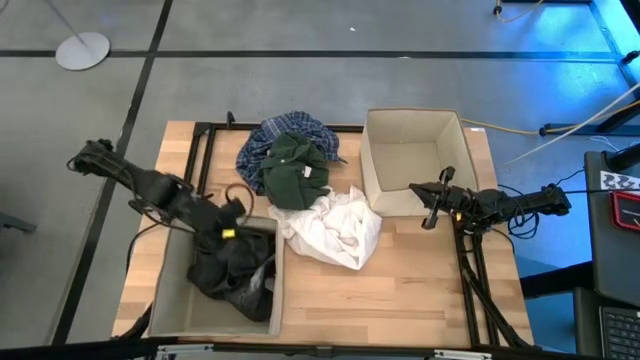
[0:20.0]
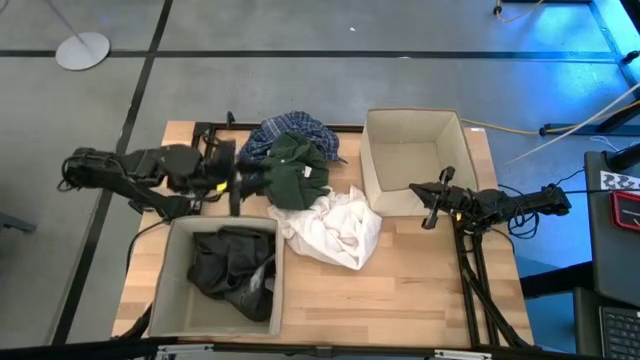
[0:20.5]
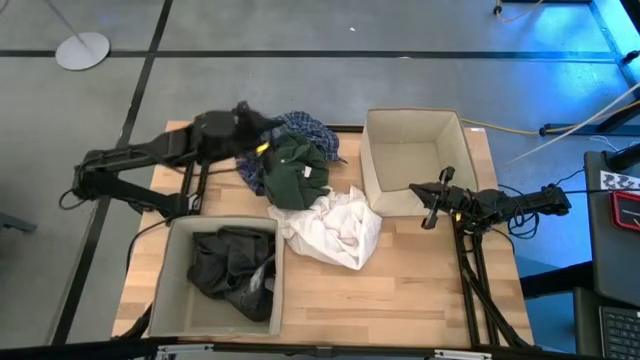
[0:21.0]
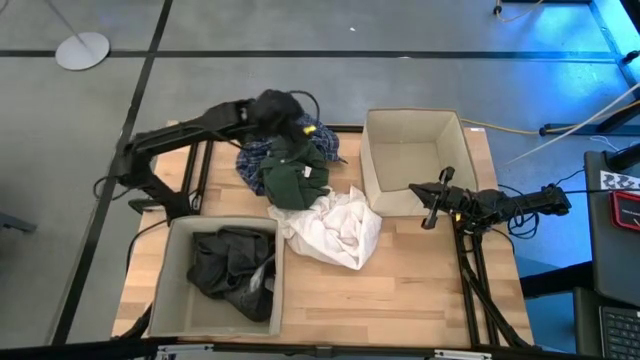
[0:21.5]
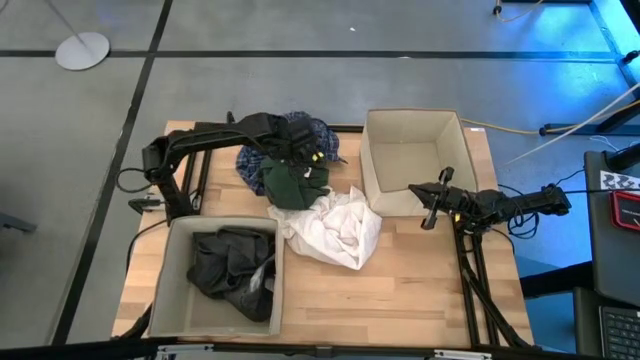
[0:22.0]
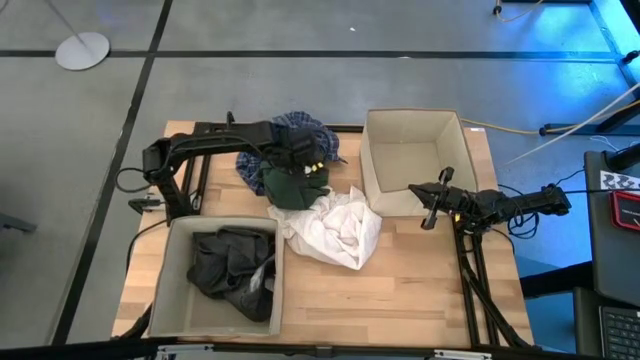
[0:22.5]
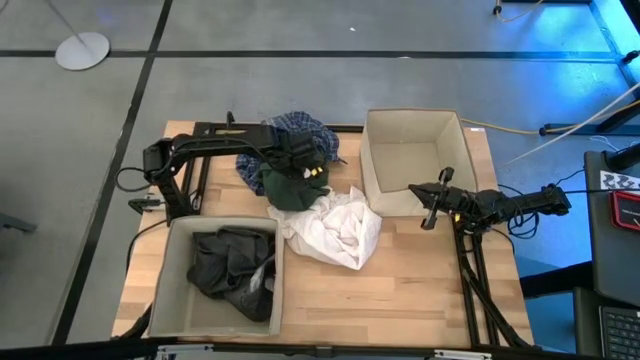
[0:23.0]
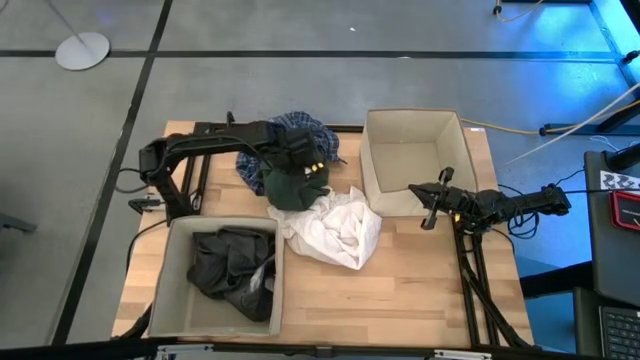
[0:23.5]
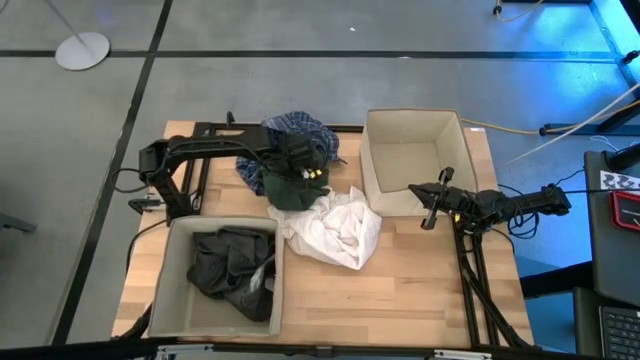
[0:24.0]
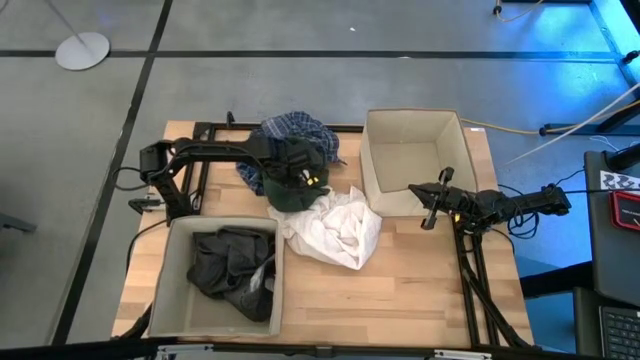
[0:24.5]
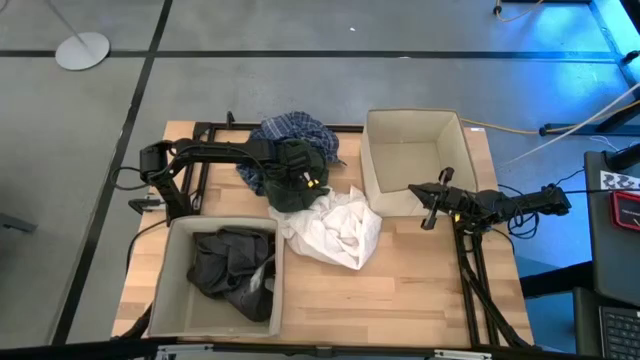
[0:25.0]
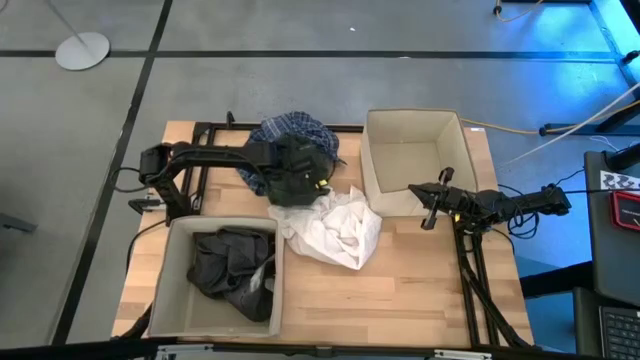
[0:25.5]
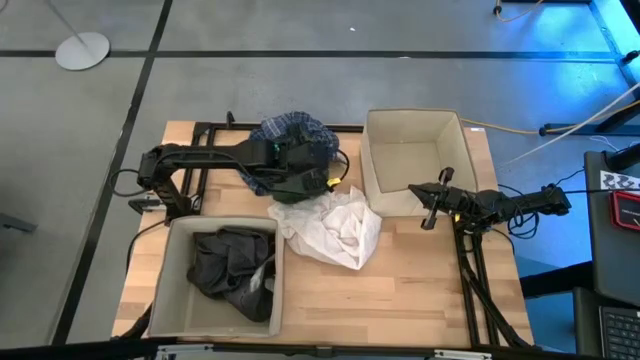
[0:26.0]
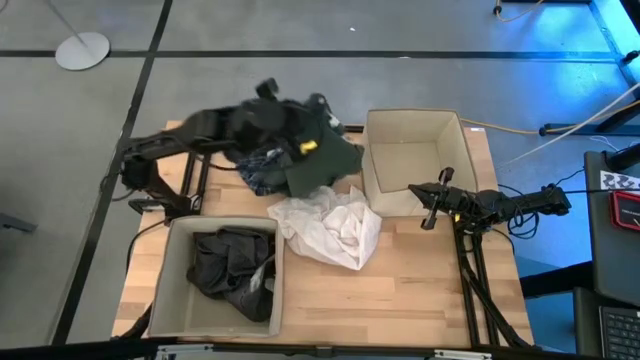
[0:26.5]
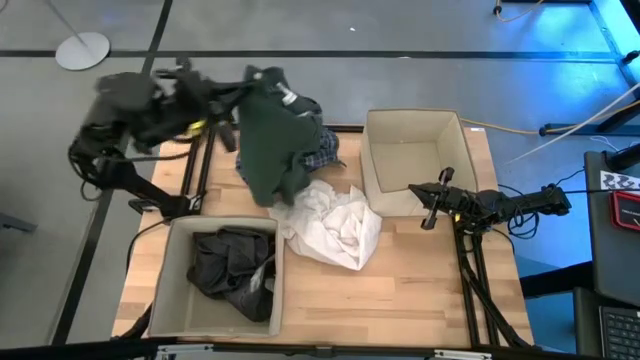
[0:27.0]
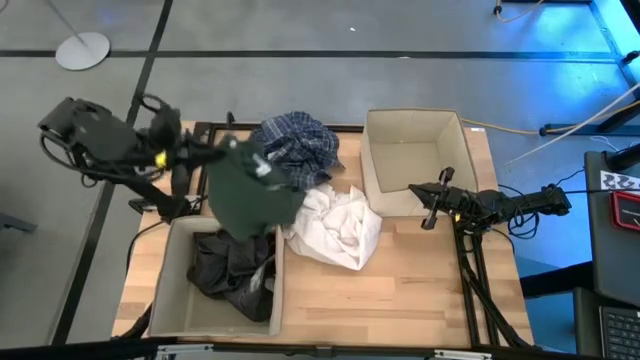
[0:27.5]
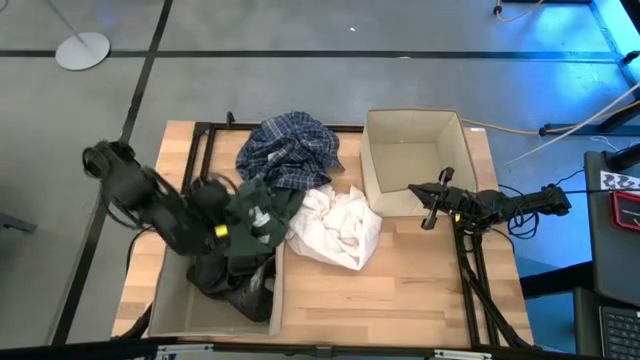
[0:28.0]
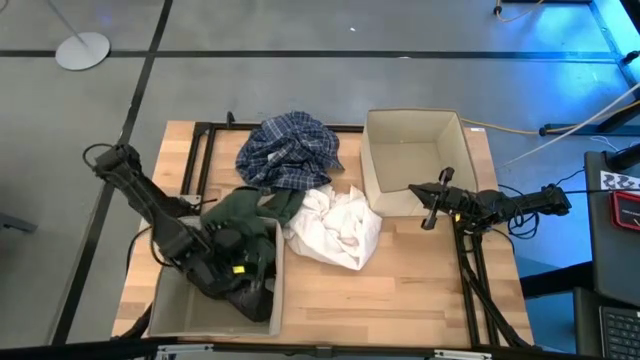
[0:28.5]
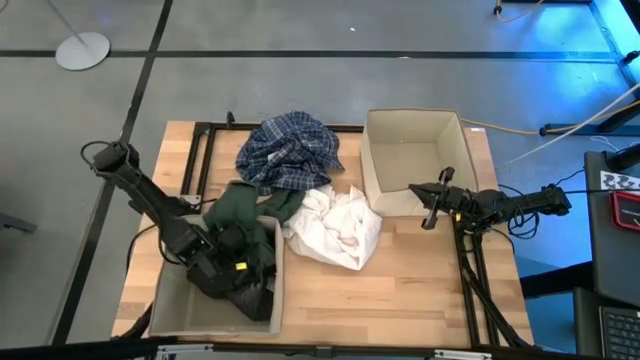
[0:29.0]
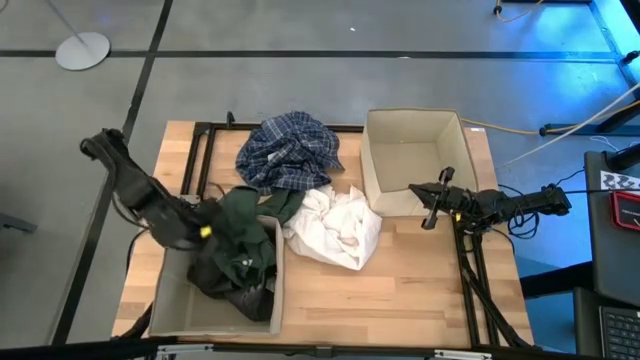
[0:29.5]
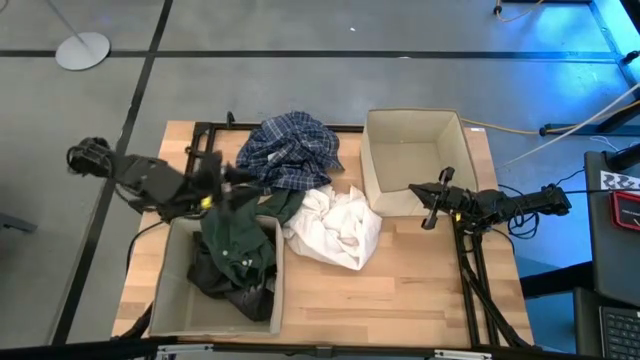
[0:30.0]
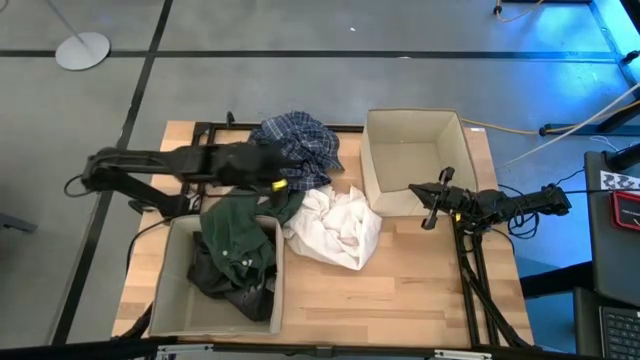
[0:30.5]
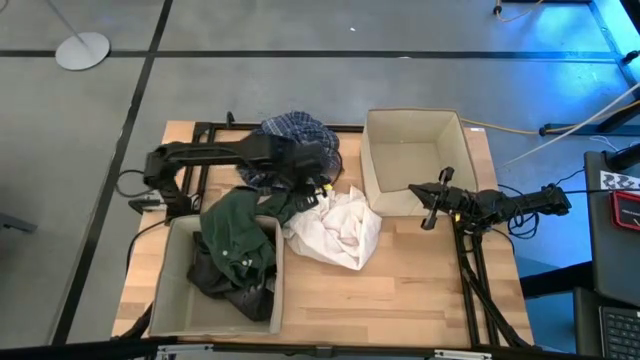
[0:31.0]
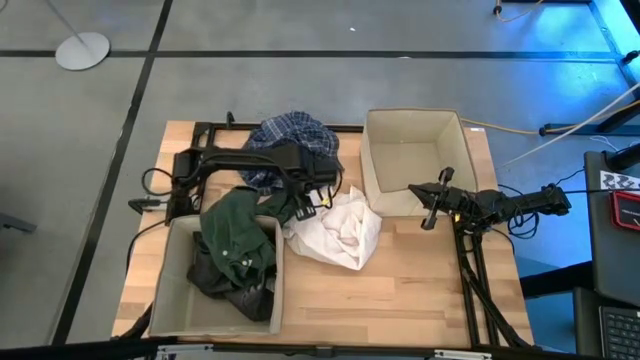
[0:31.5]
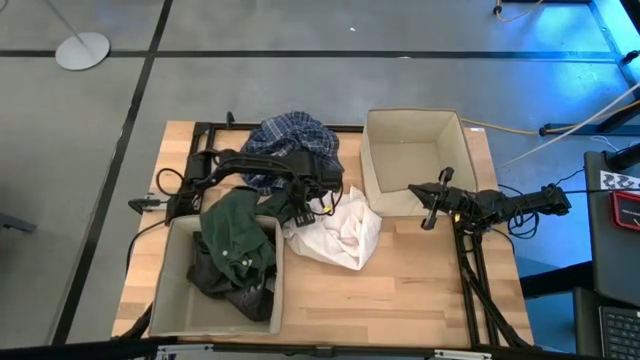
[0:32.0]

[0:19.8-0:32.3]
Task: Sort clothes
Put the green polo shirt into the left brown laundry organizer

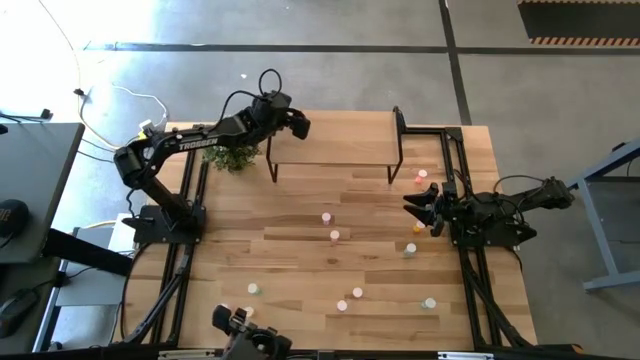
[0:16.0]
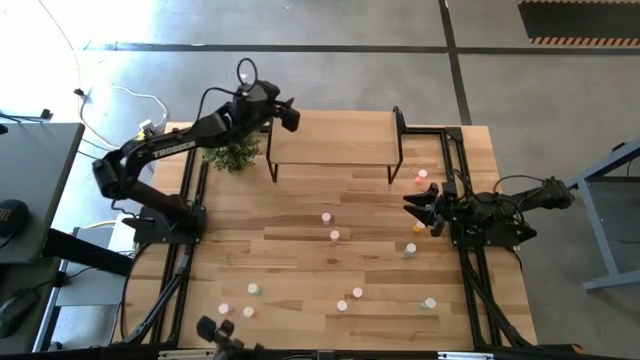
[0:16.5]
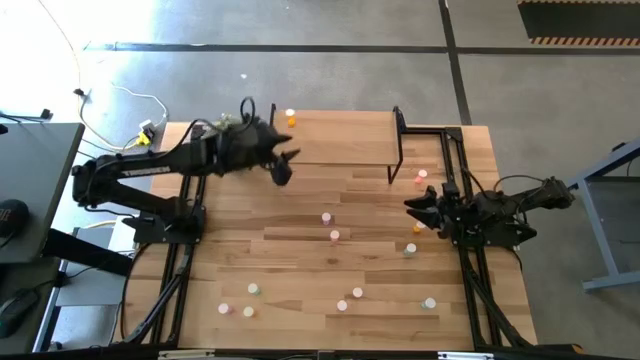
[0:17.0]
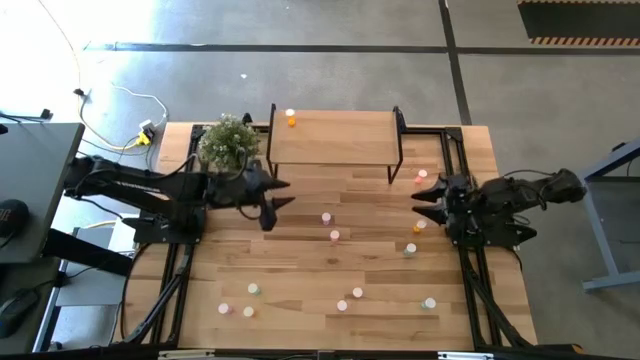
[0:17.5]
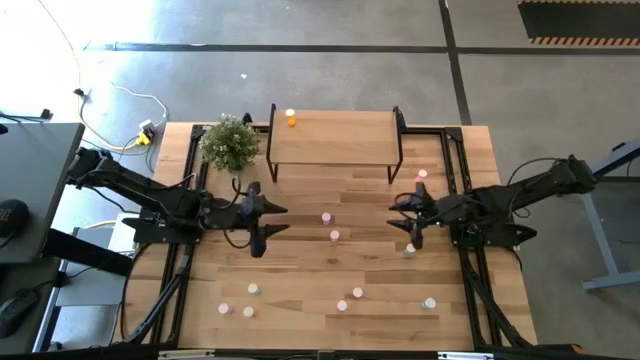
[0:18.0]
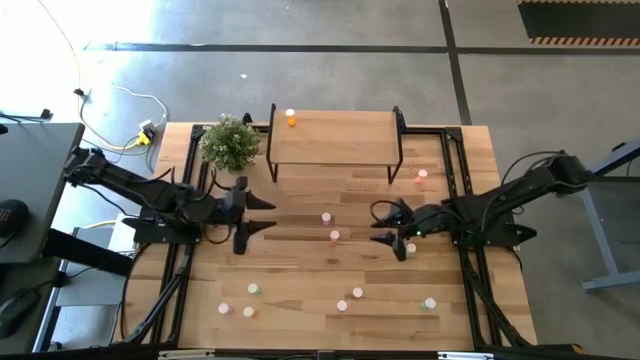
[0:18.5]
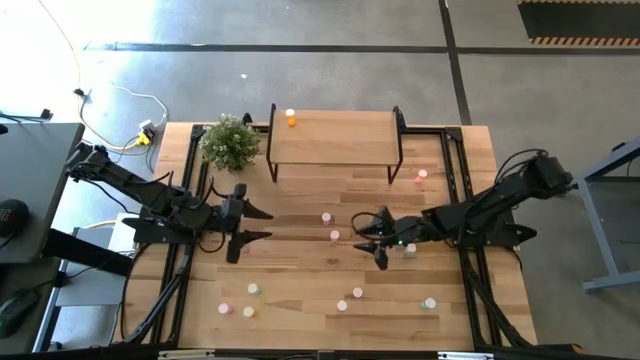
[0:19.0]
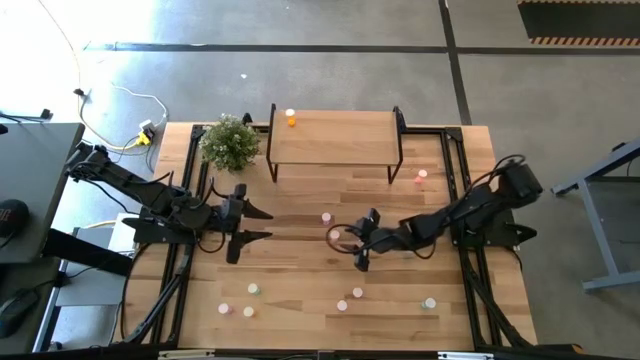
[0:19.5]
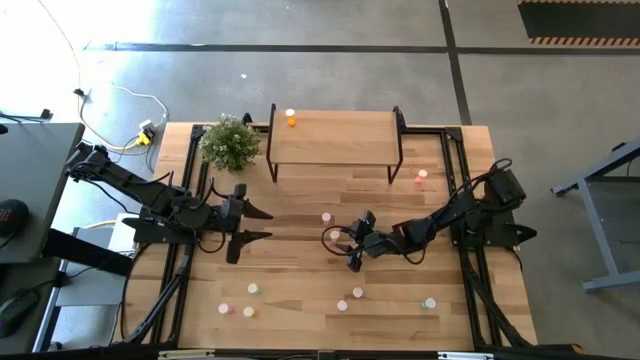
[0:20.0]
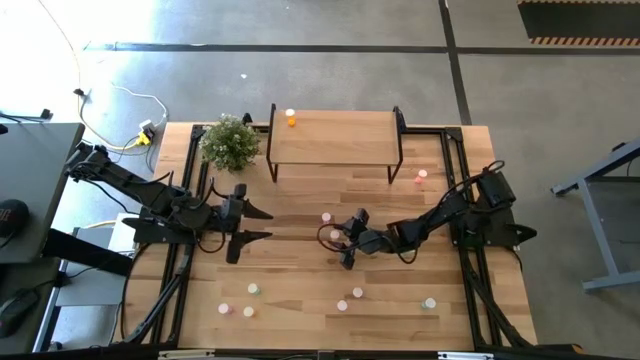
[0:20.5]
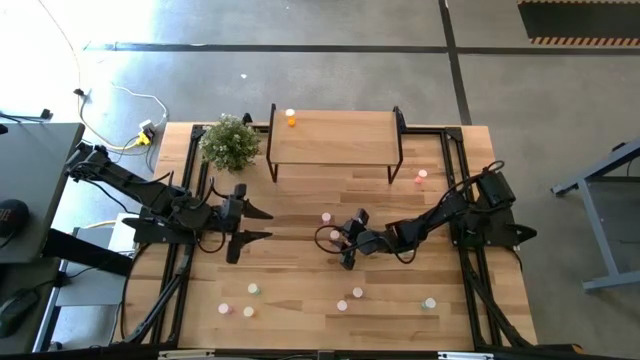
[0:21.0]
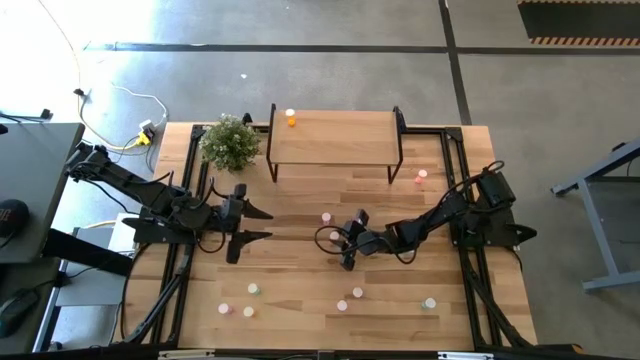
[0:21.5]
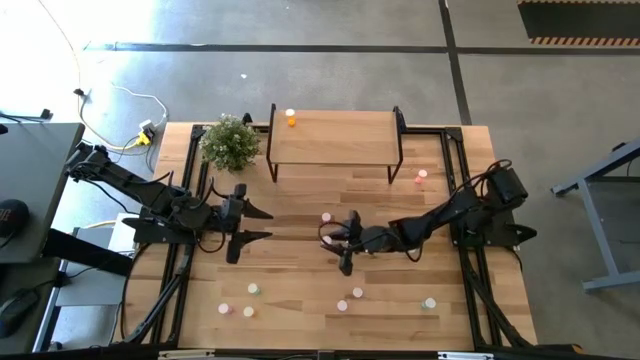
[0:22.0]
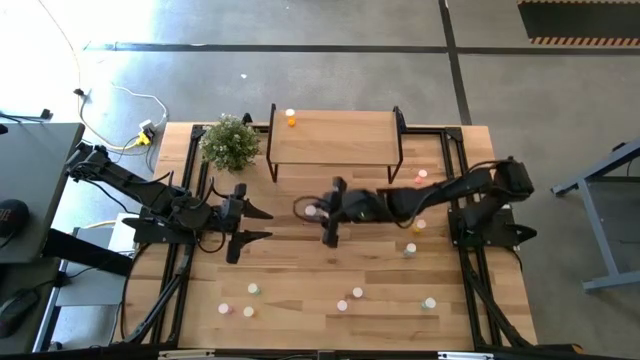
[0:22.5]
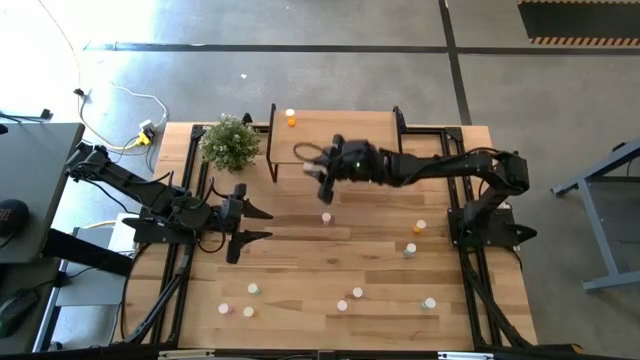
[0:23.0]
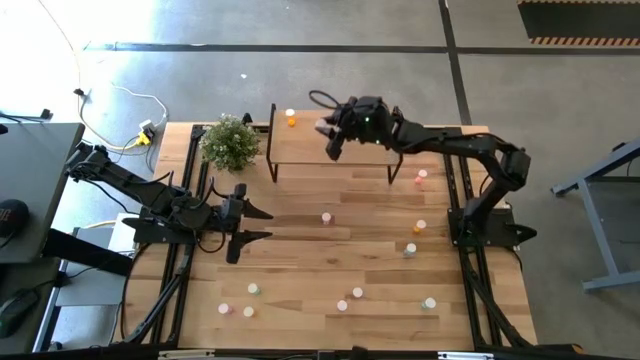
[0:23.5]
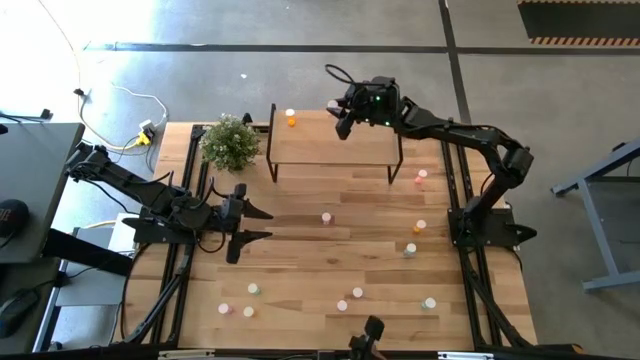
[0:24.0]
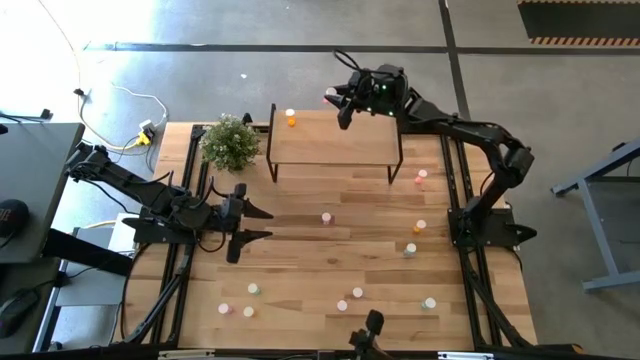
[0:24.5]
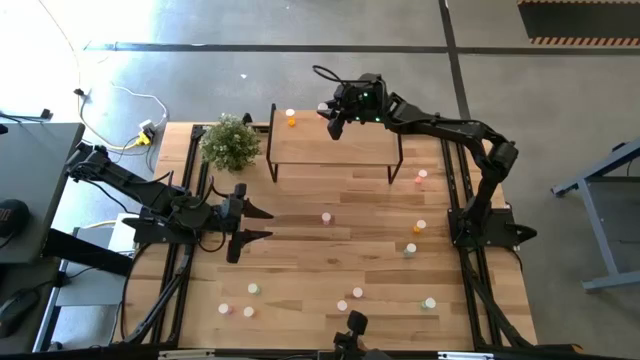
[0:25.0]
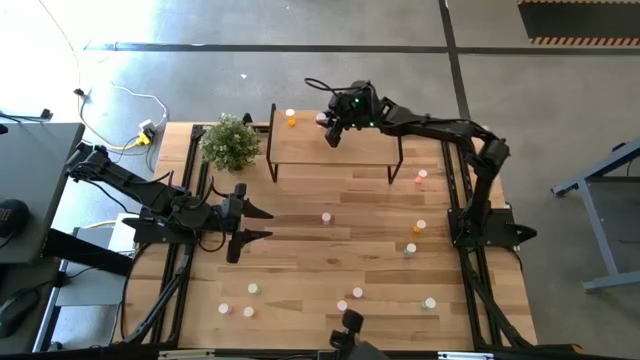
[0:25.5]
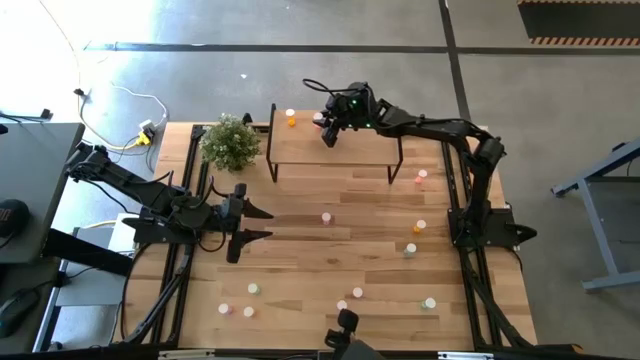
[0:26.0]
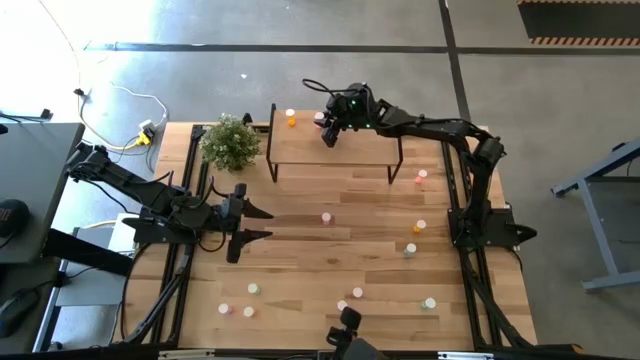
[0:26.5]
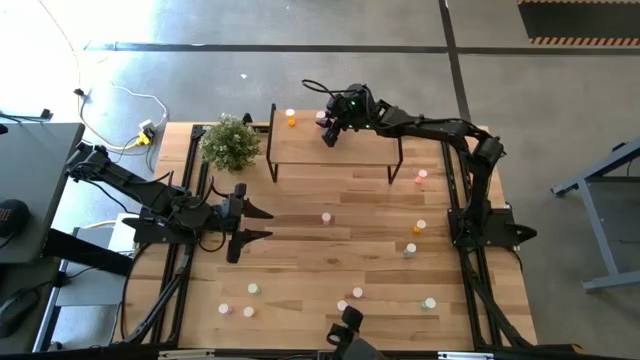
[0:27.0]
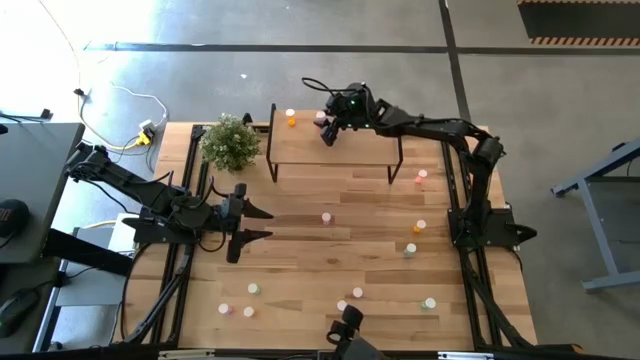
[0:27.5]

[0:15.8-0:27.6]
Task: Pick and place medicine bottles onto shelf by color
Put the middle pink pill bottle on the shelf
